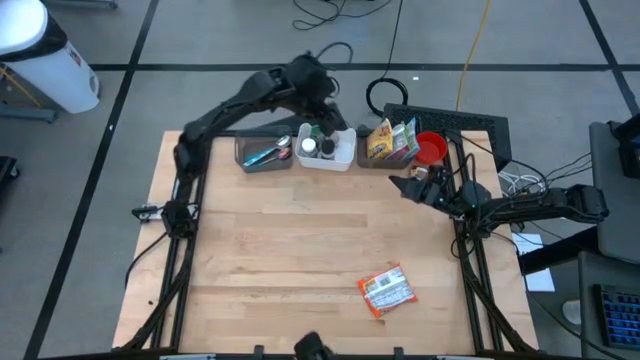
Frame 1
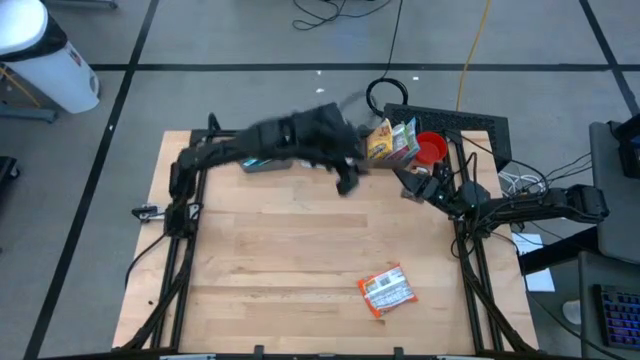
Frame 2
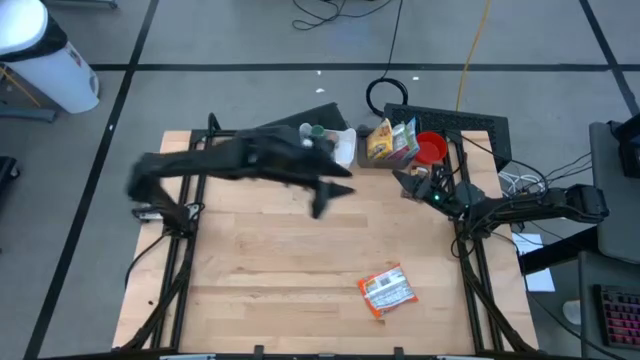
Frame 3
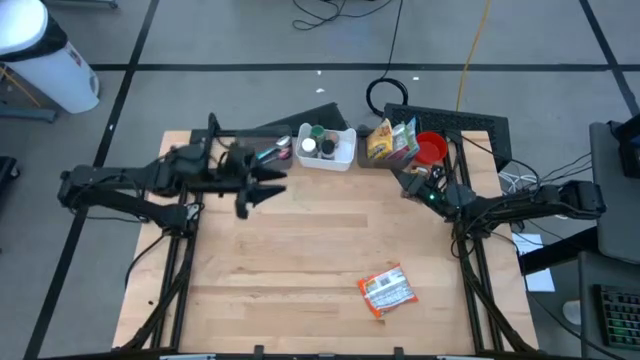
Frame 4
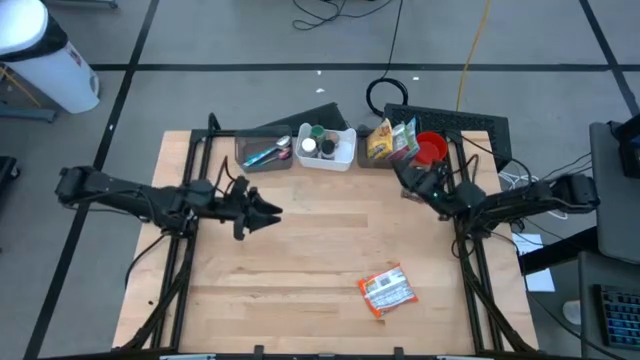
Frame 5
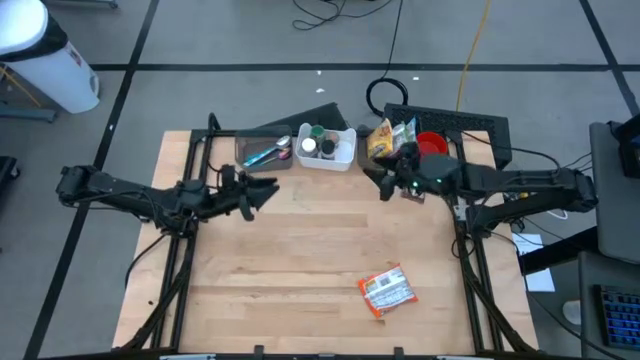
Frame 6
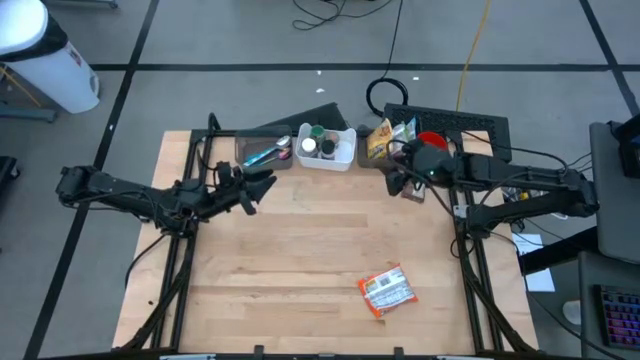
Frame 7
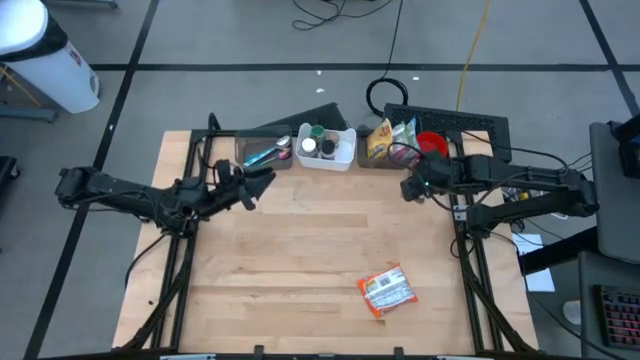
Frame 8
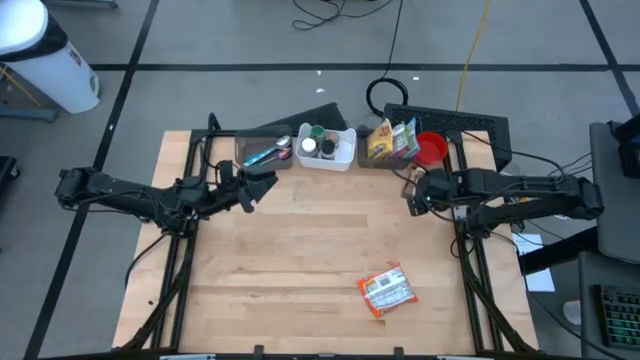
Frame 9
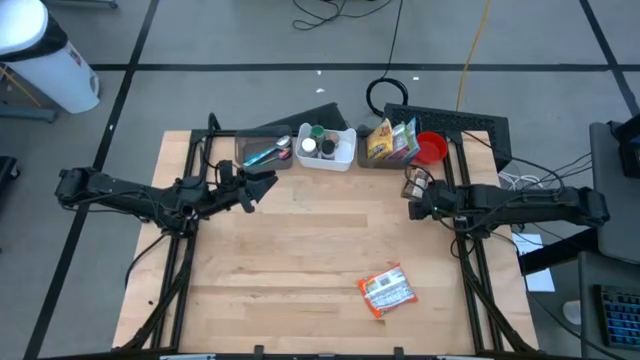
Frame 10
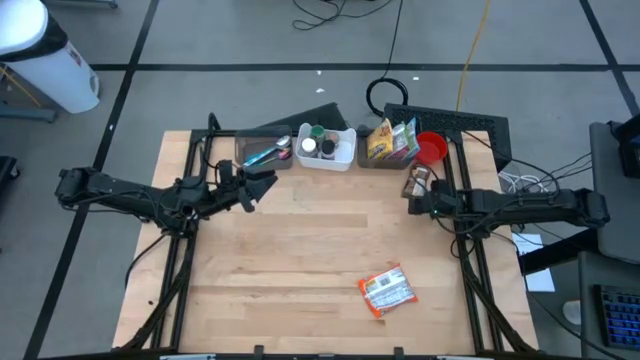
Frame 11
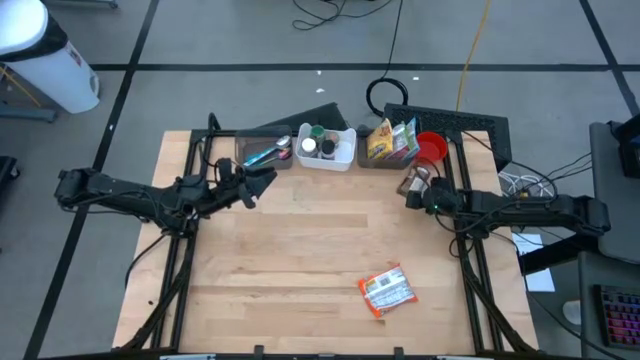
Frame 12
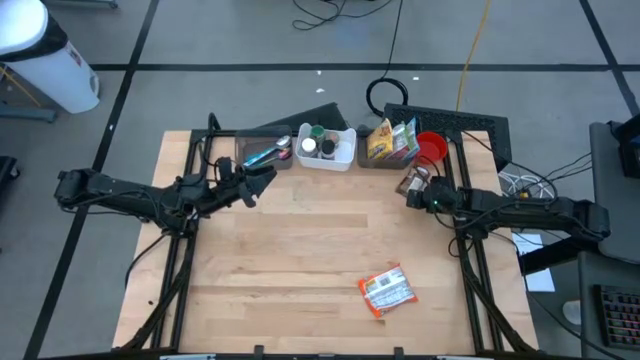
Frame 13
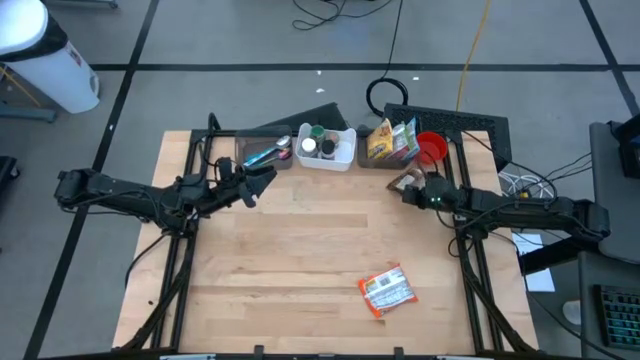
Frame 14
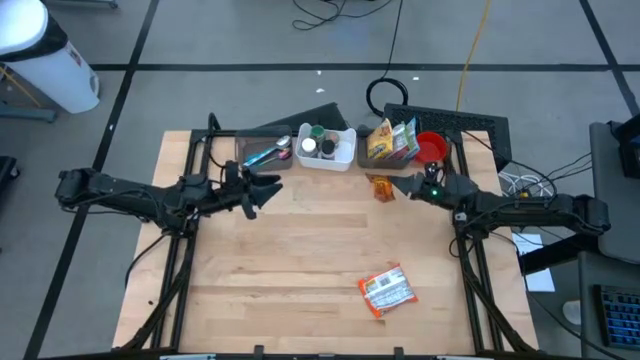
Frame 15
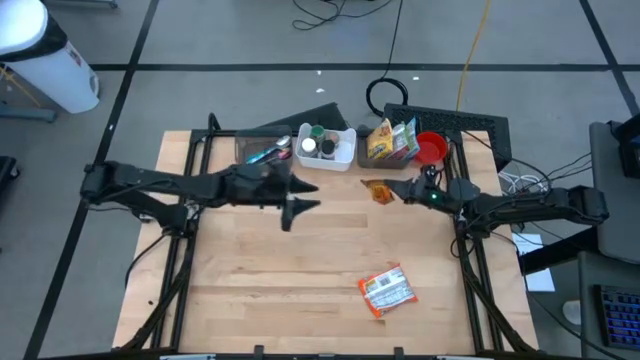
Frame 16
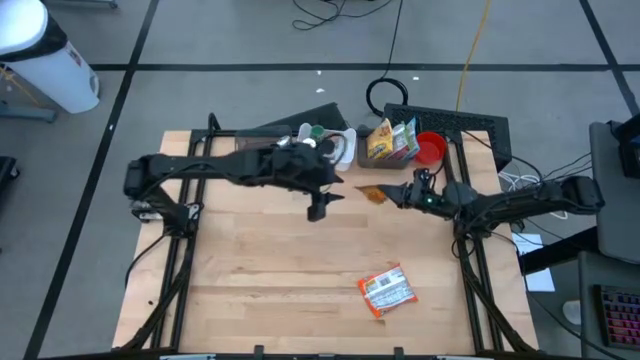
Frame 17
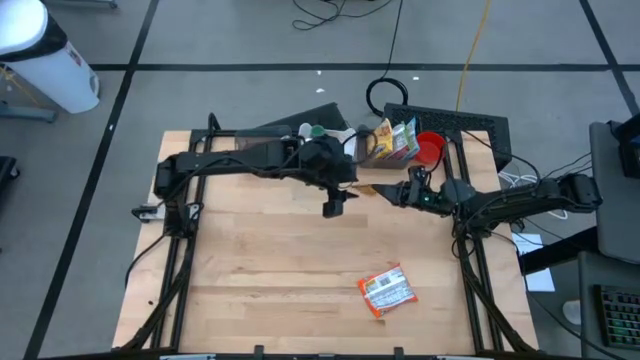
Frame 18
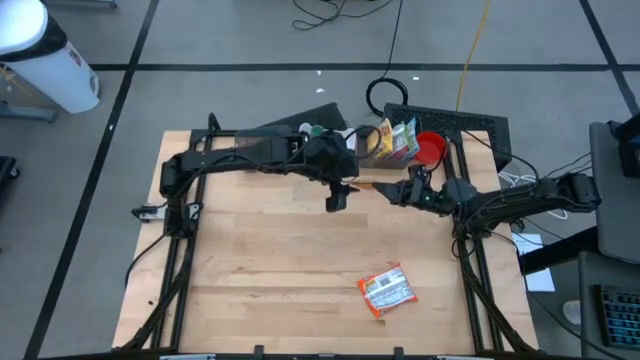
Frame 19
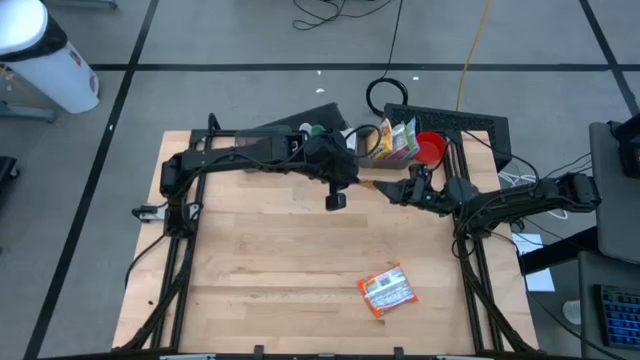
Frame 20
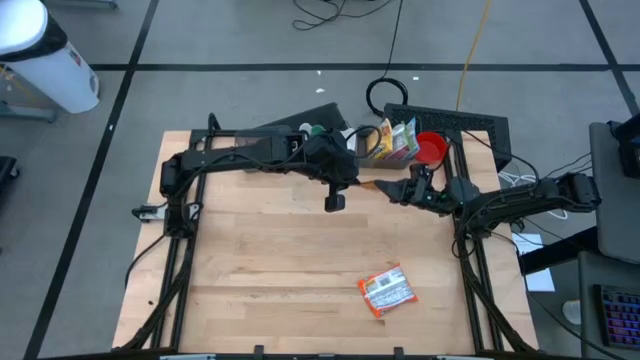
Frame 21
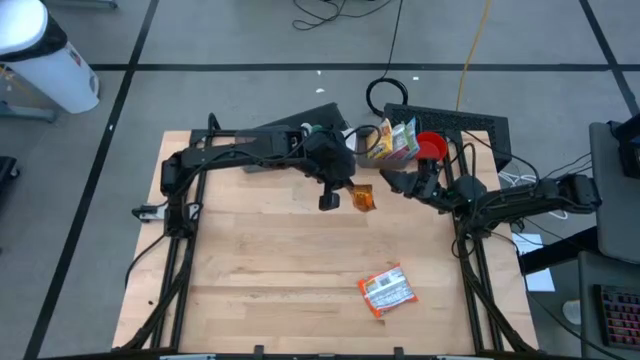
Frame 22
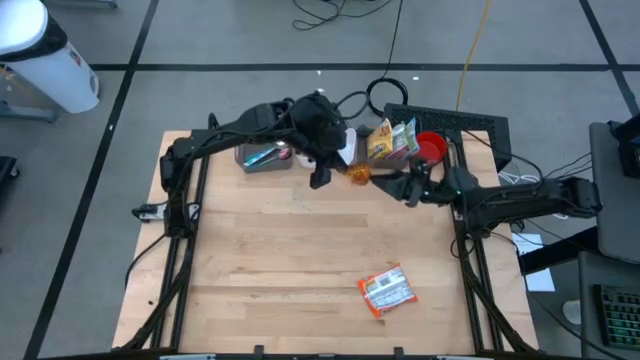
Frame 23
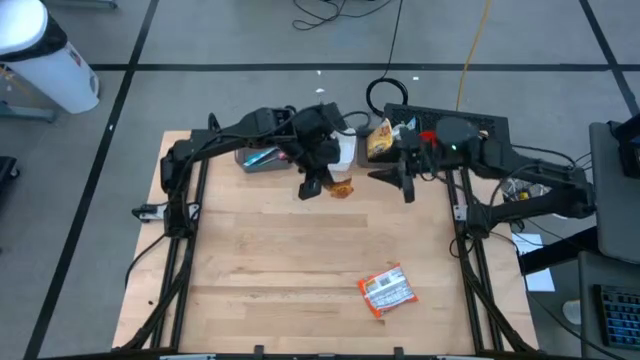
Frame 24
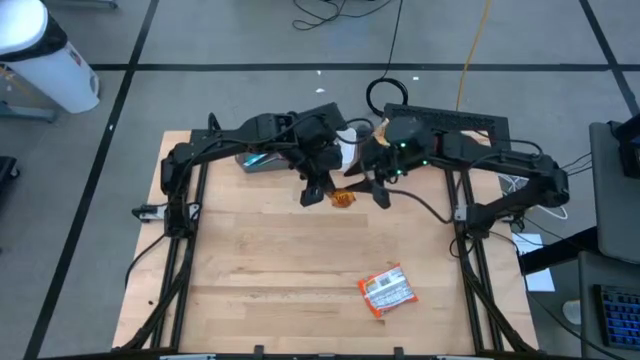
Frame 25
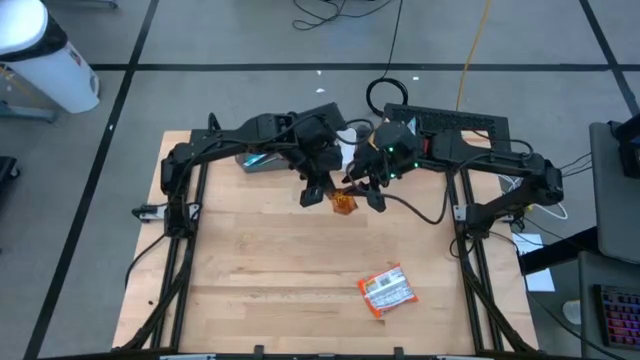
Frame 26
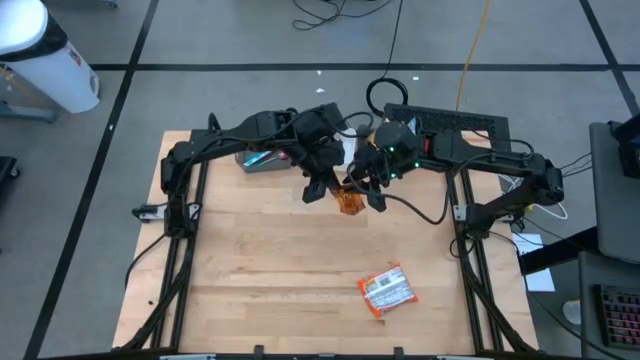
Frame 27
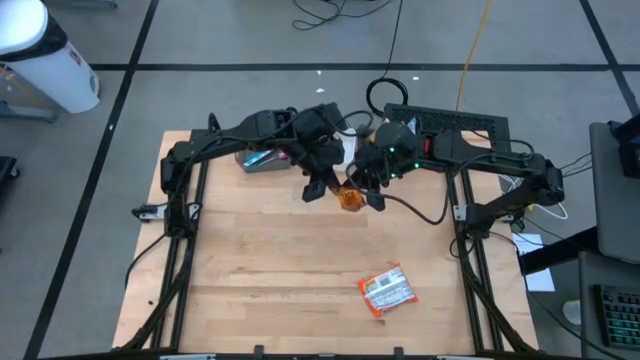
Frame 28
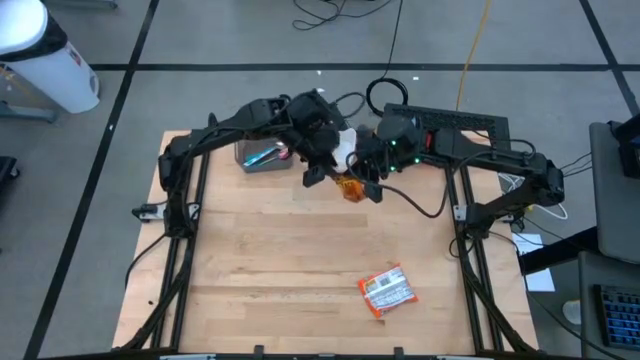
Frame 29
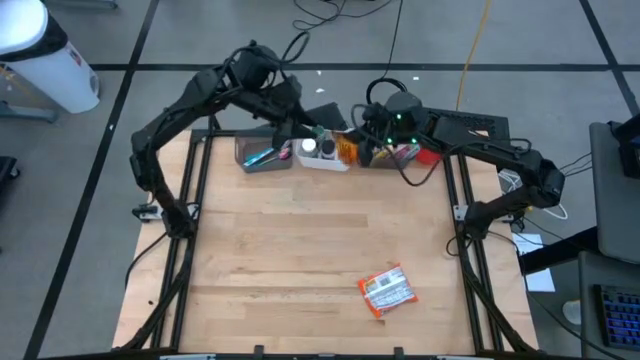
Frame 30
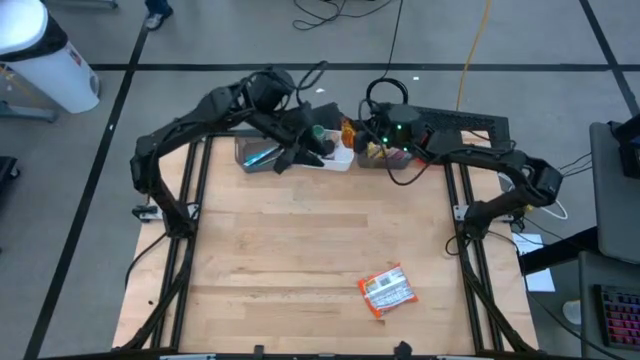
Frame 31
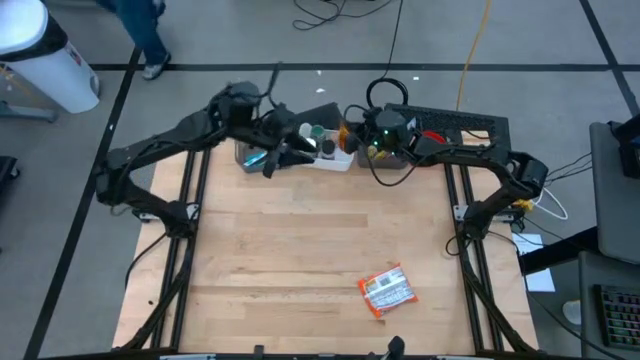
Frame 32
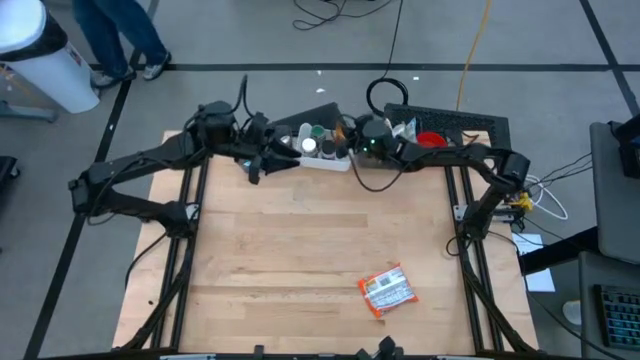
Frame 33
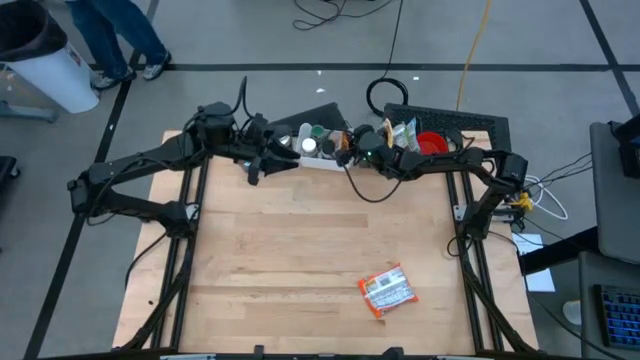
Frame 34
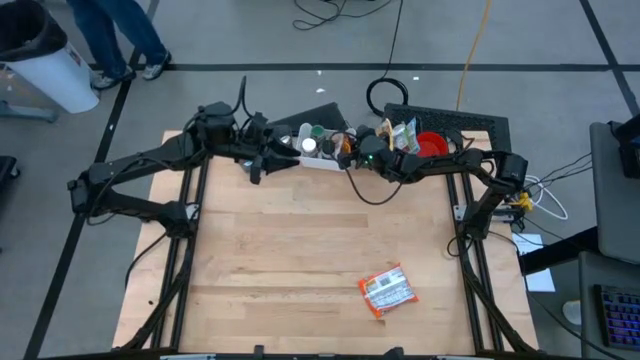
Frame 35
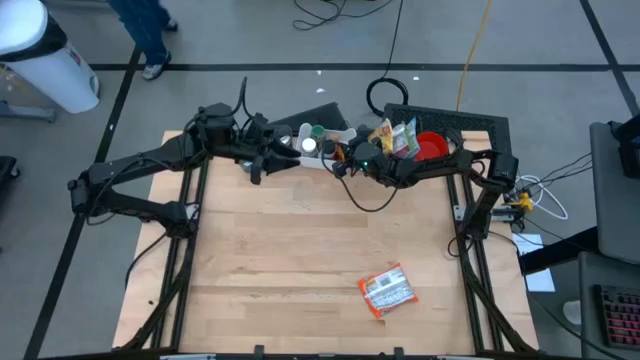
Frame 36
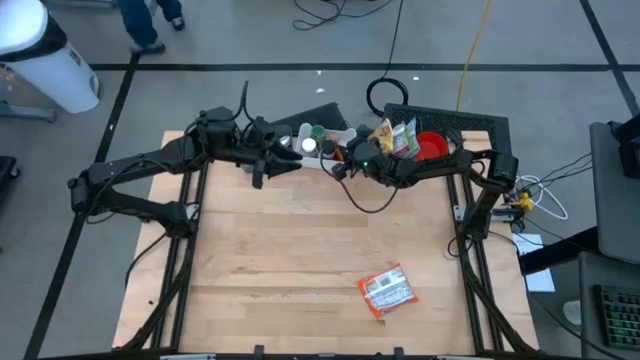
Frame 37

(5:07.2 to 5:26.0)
Task: Pick & Place Food Item
Put the orange seasoning pack into the white bin

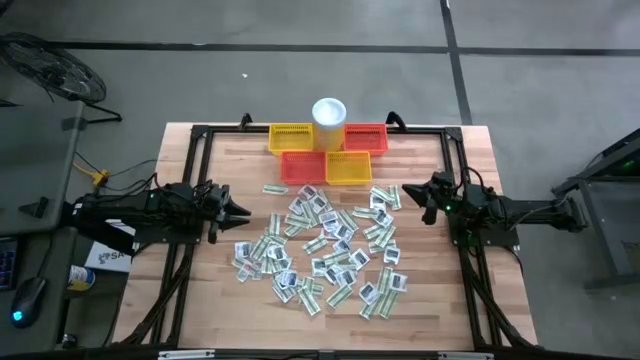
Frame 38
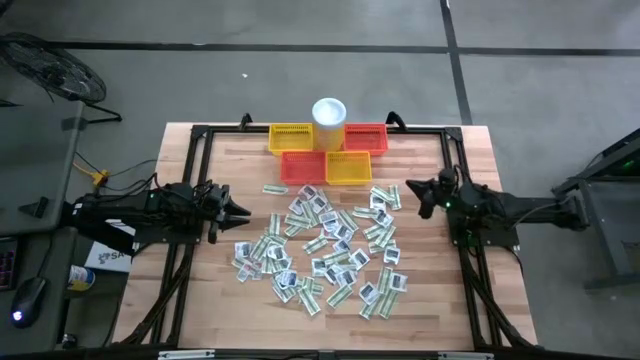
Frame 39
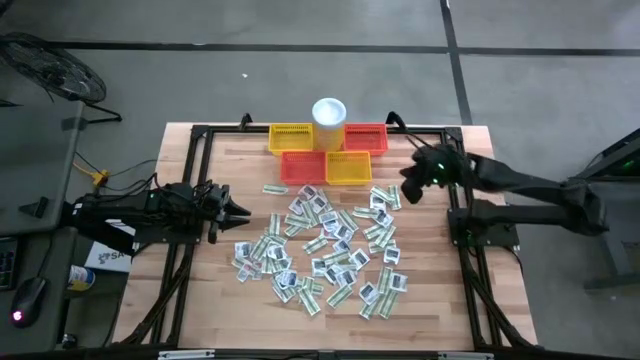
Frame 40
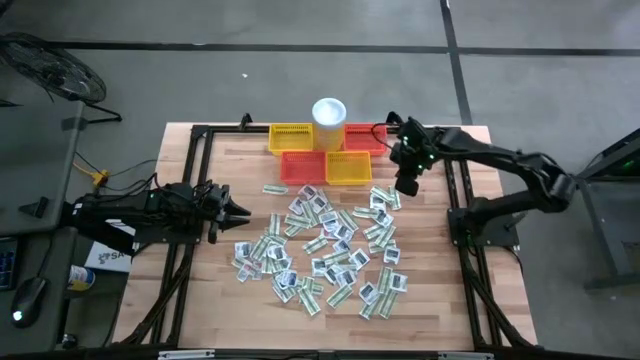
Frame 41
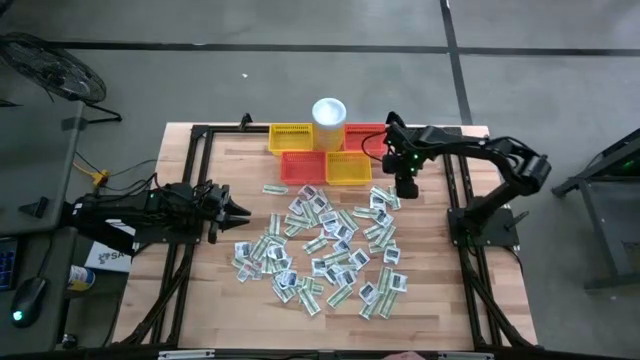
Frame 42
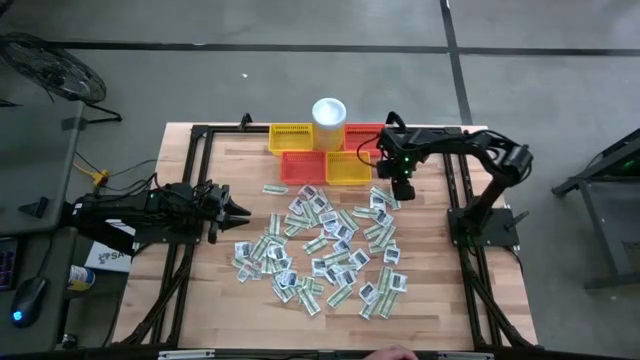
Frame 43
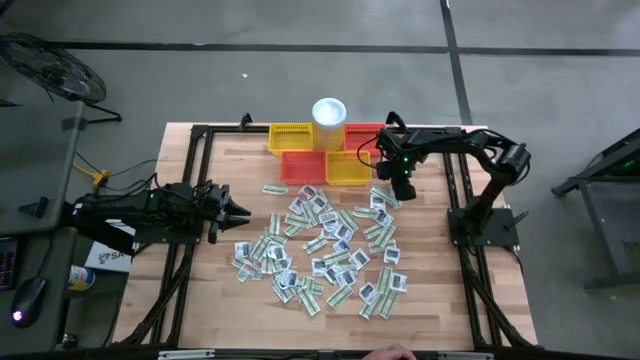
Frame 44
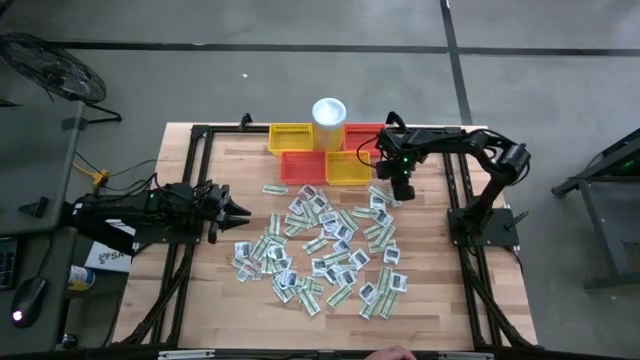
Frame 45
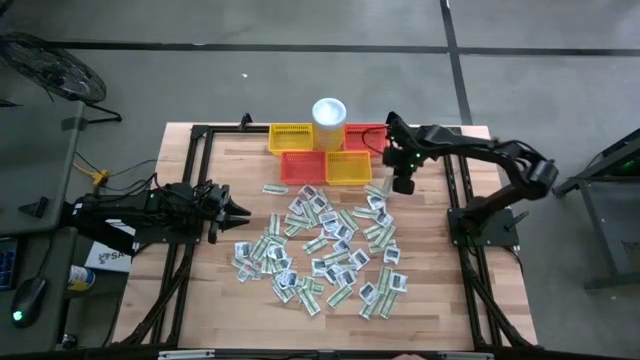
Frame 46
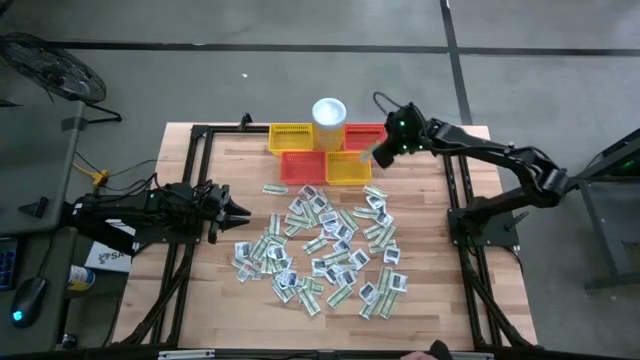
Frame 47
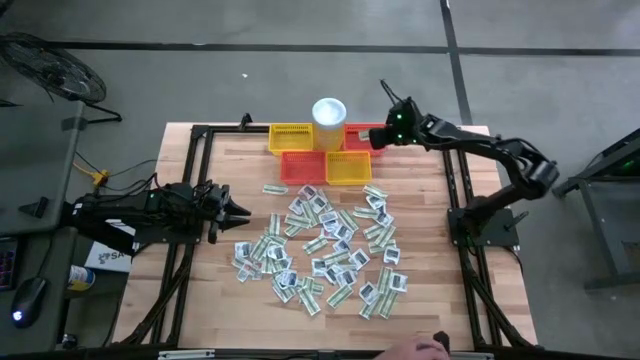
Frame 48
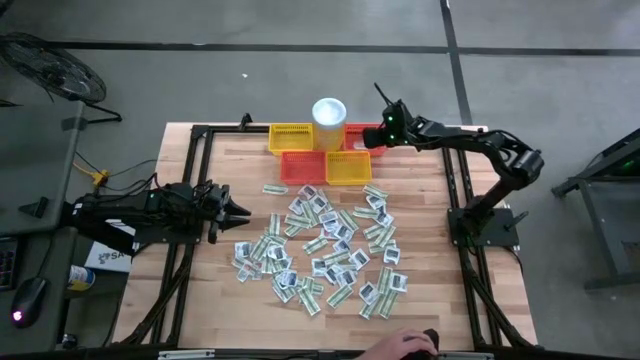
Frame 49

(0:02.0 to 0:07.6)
Task: Pick & Place First Aid Supplies
Put the green bandage pack into the top orange basket
